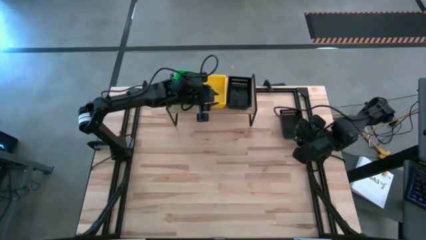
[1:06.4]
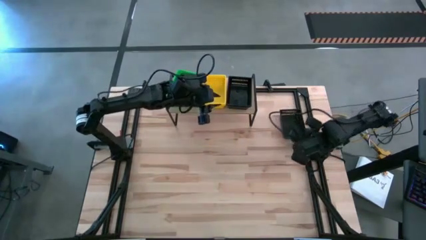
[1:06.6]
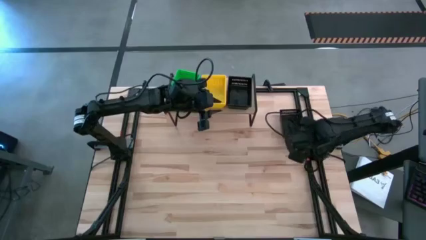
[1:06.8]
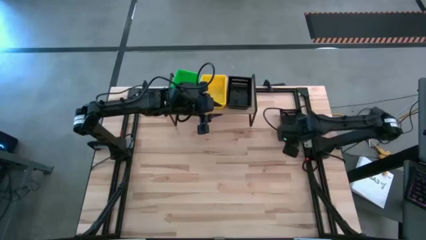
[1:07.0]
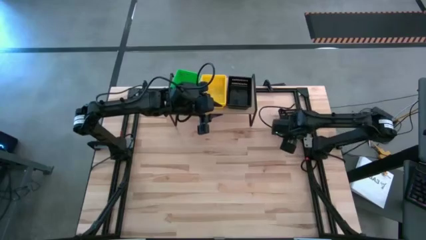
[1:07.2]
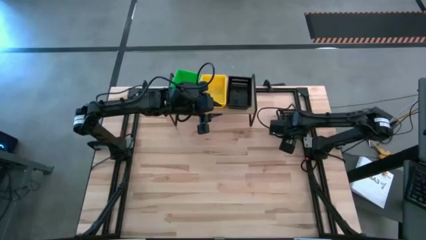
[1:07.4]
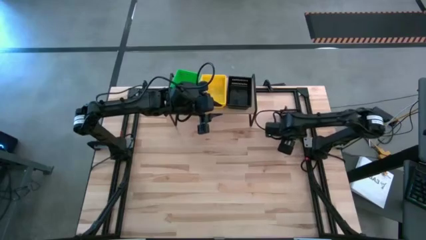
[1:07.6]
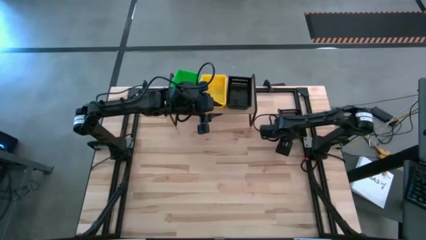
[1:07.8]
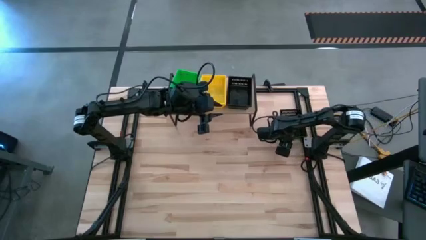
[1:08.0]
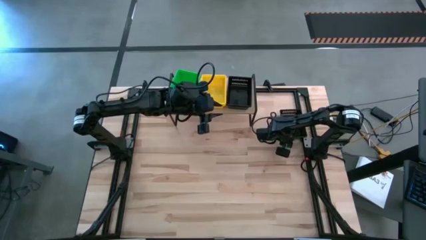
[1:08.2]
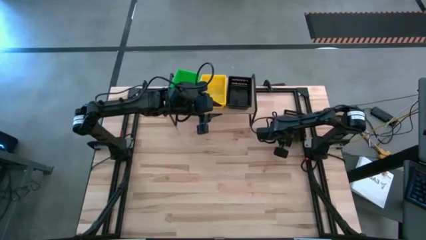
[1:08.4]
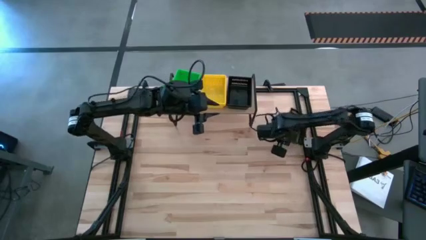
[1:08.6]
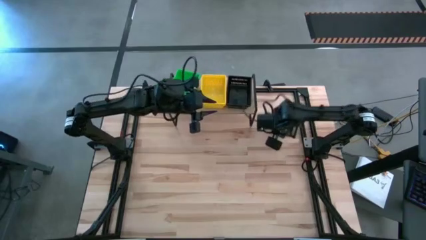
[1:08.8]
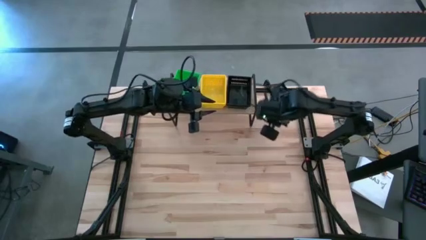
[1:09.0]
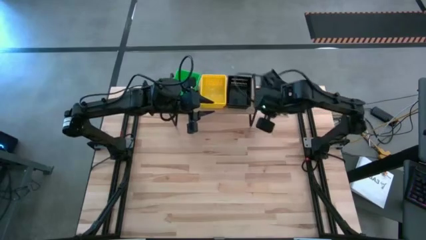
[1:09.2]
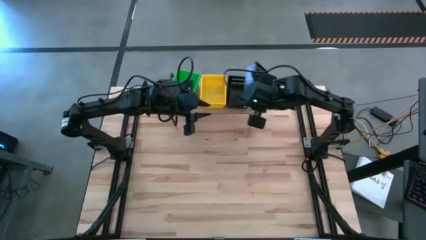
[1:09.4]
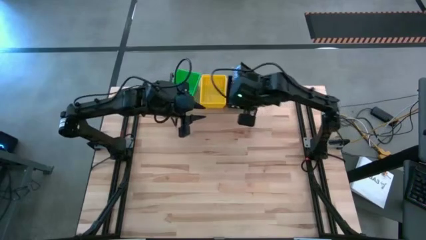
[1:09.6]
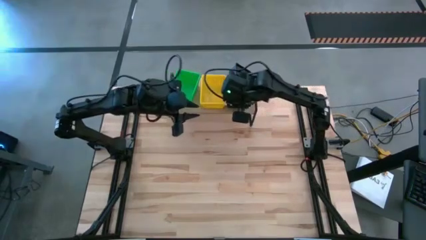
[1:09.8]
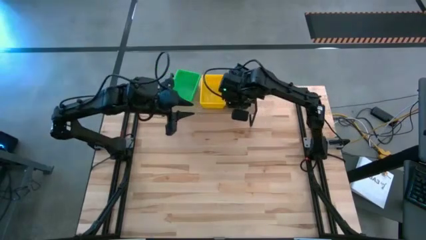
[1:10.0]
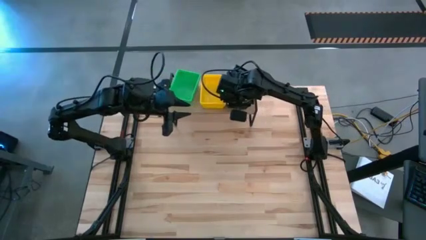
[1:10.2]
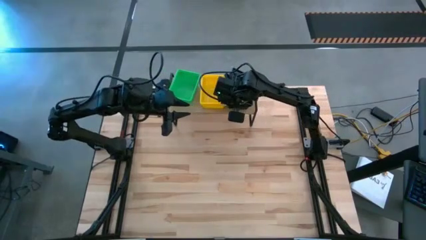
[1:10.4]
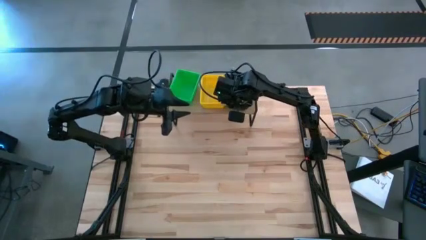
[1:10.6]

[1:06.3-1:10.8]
Task: Stack baskets on shelf by color
Stack the black bin on the black bin on the shelf

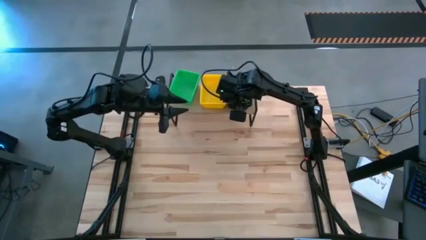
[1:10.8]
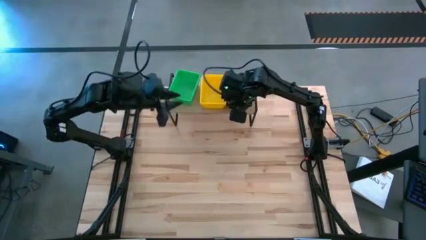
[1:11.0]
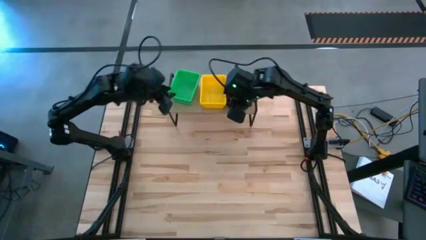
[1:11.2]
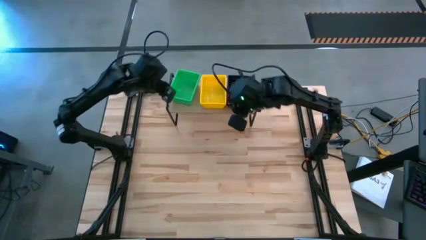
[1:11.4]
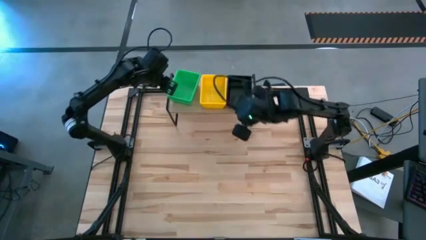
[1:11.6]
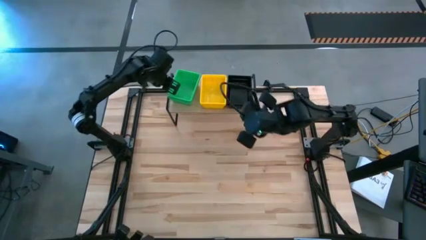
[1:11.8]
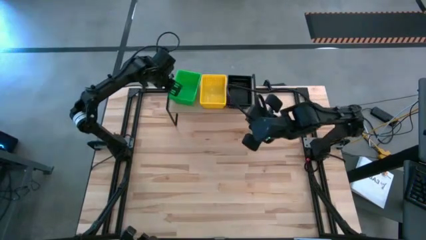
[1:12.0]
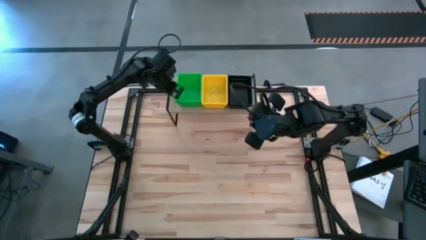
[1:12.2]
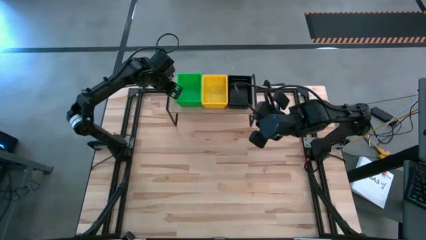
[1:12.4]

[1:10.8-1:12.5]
Adjust the stacked green bin on the shelf

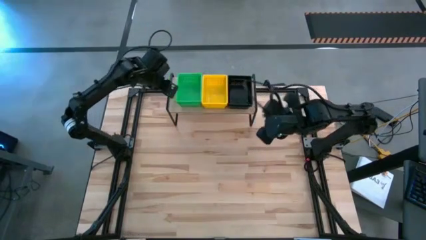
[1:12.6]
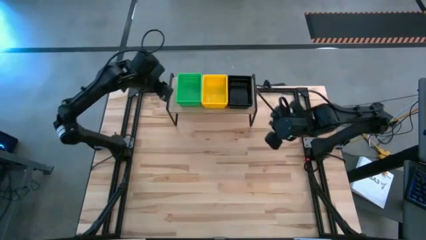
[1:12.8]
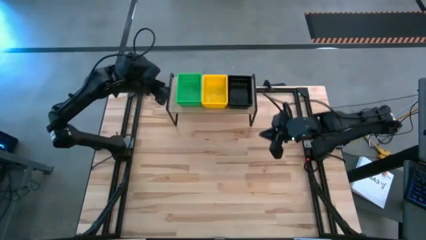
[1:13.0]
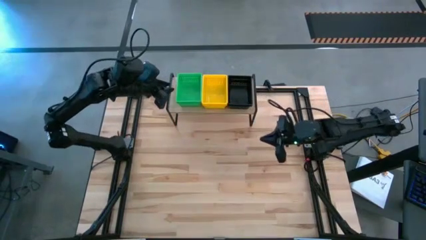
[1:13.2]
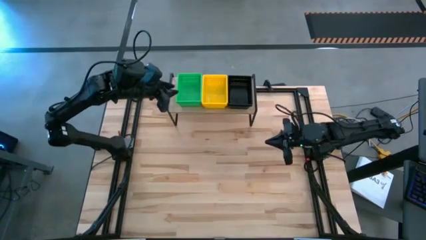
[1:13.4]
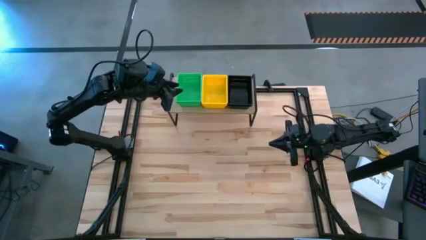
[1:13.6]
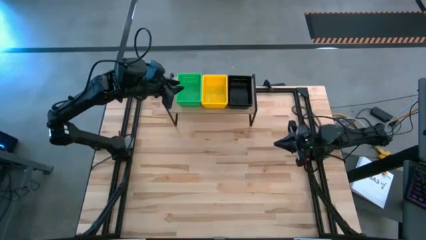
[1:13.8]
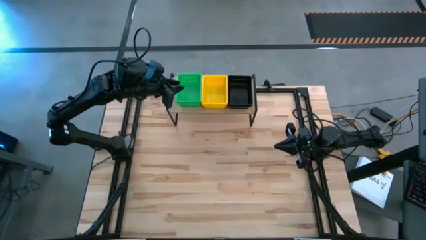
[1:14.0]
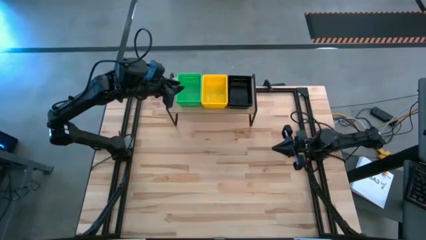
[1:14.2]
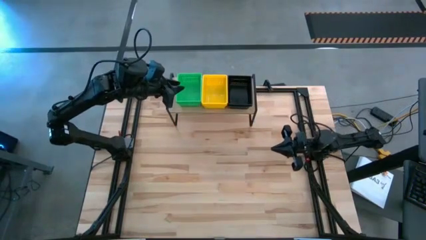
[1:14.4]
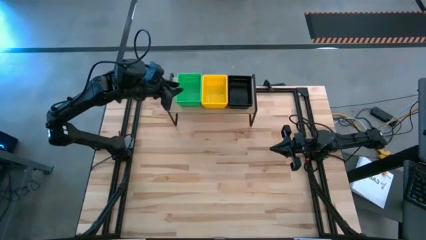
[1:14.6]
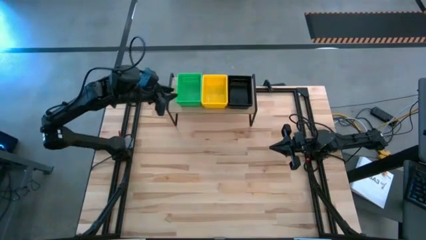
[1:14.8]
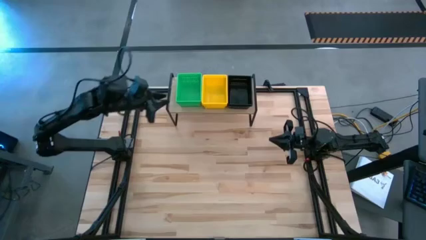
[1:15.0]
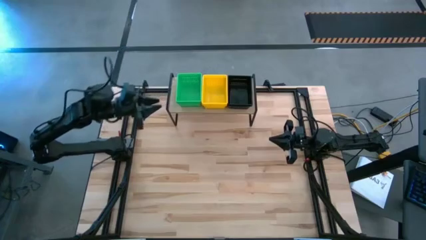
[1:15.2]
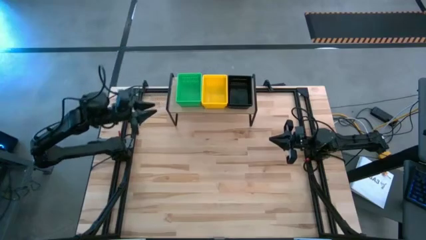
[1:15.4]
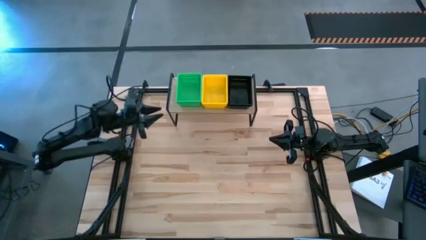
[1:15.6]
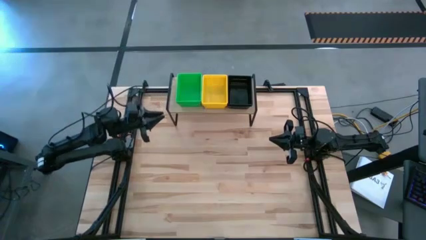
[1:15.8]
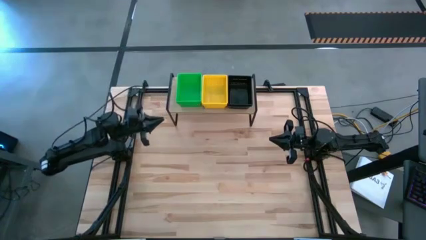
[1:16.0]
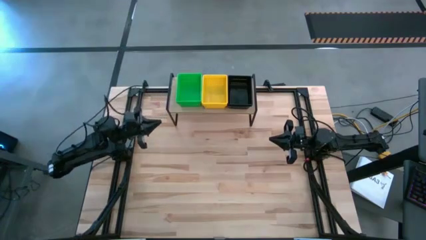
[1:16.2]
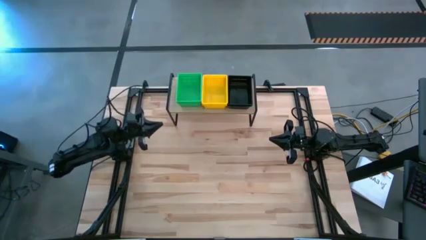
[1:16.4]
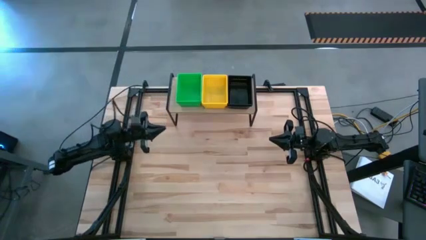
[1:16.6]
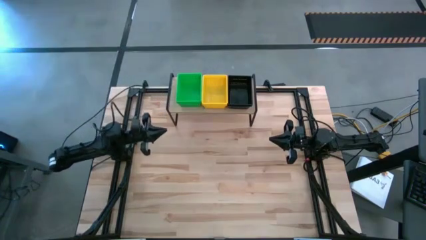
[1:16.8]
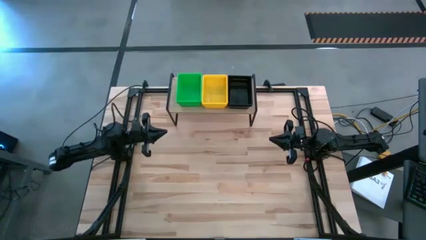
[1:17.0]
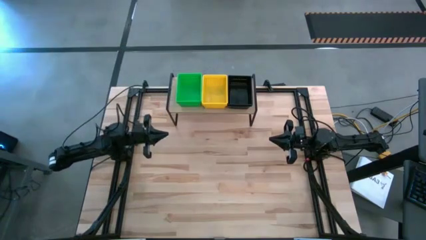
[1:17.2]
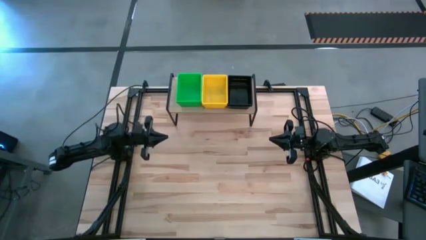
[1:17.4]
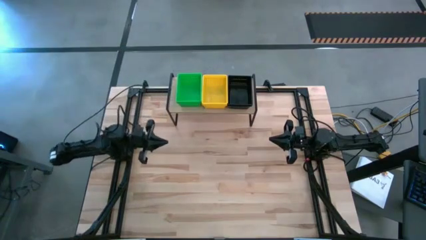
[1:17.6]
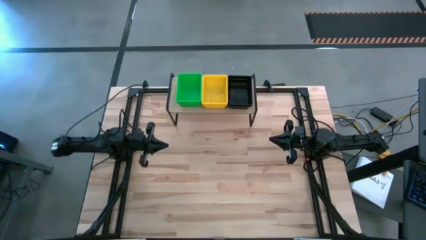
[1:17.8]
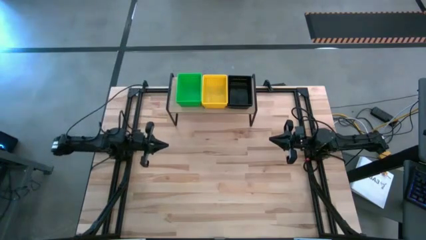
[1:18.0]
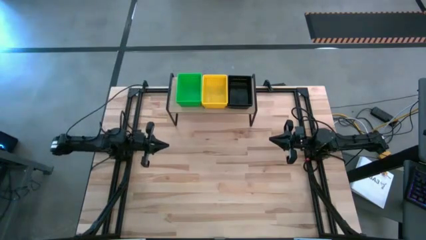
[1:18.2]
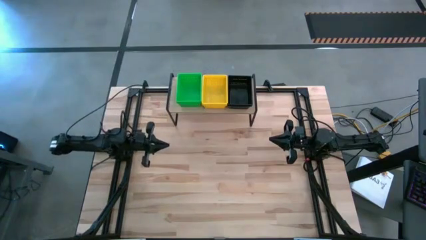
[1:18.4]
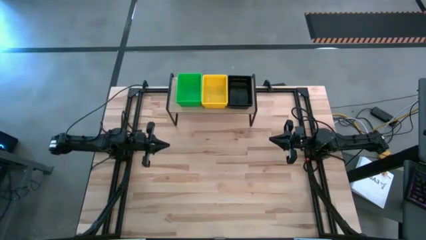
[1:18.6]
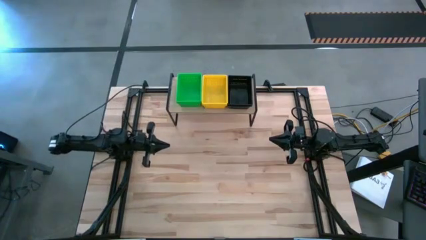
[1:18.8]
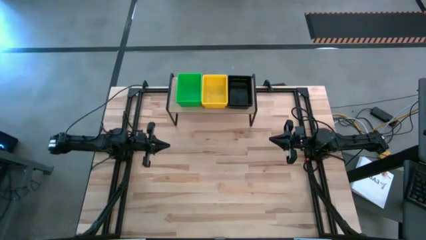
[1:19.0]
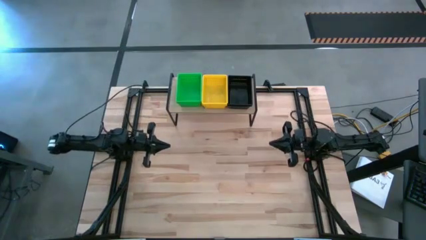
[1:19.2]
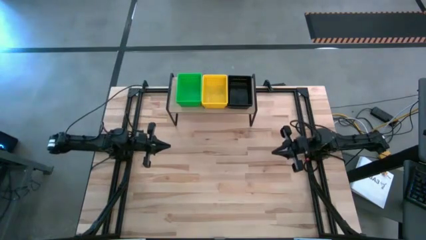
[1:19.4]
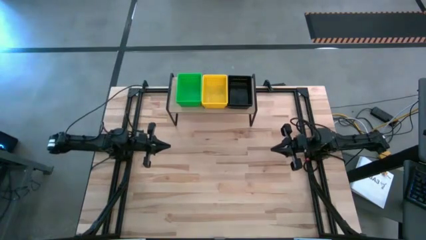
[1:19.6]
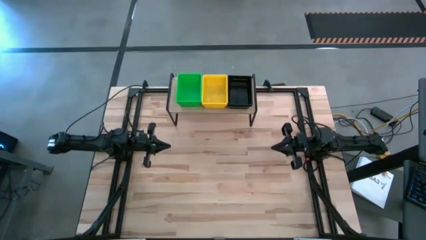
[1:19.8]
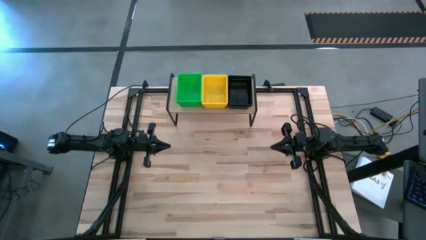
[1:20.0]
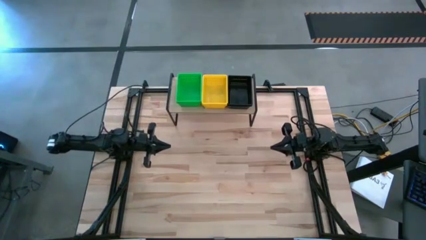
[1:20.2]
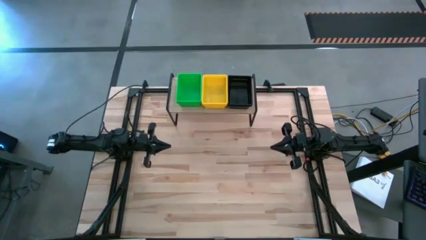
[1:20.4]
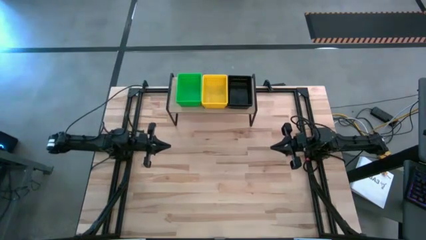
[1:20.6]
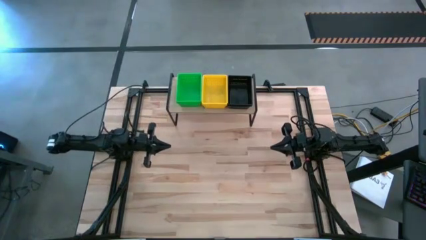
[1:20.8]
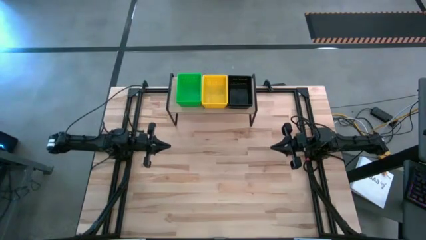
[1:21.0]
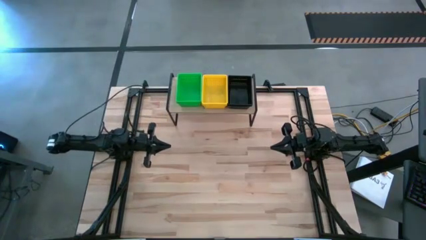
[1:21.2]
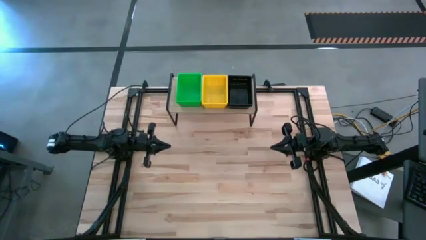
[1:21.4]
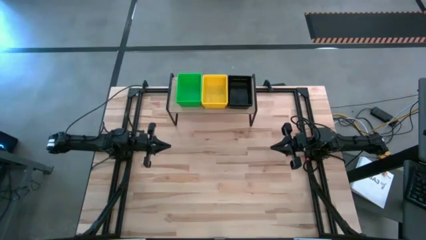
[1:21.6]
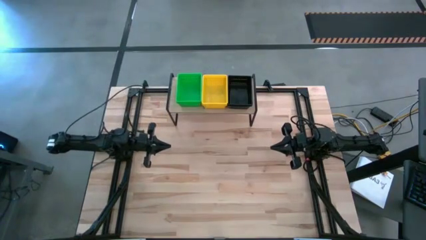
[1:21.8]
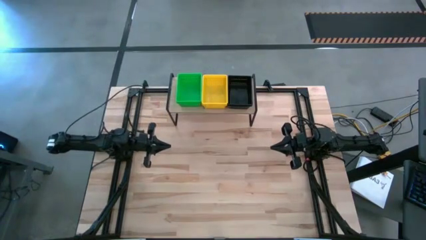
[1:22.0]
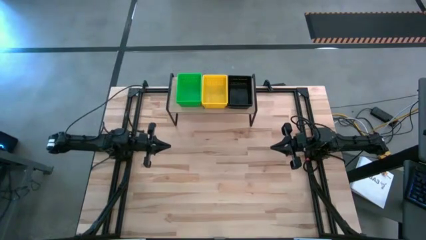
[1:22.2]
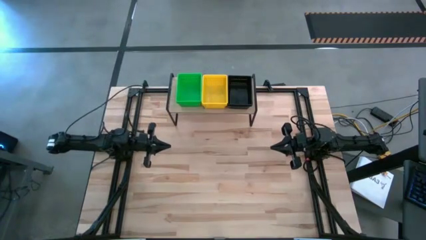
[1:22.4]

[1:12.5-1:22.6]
Return to Home Position
